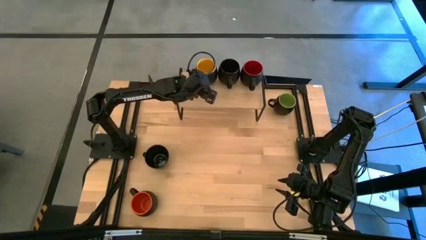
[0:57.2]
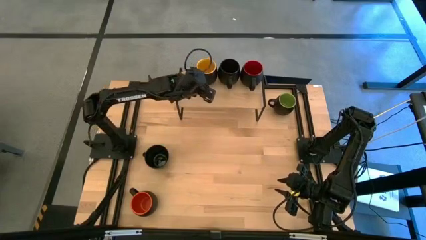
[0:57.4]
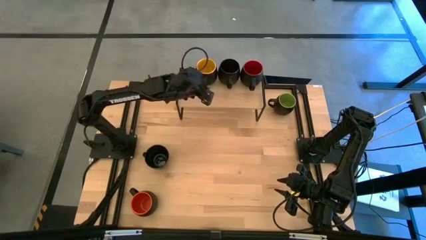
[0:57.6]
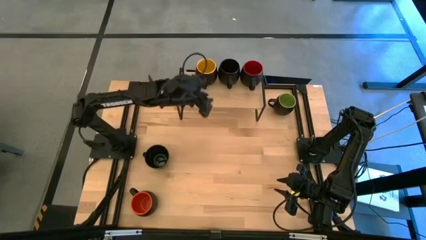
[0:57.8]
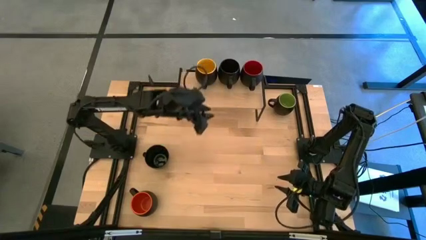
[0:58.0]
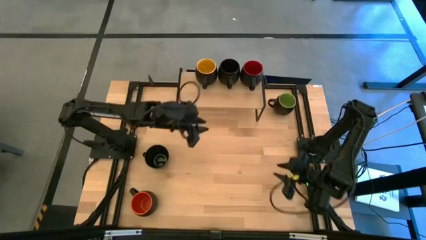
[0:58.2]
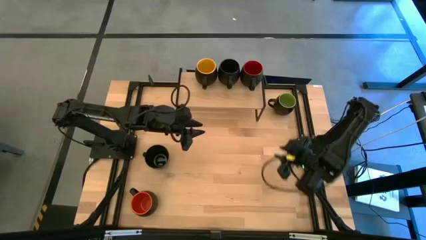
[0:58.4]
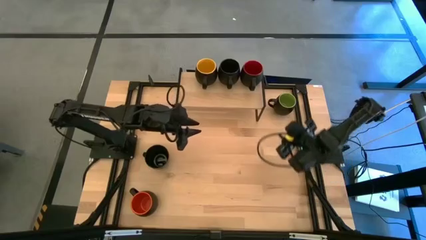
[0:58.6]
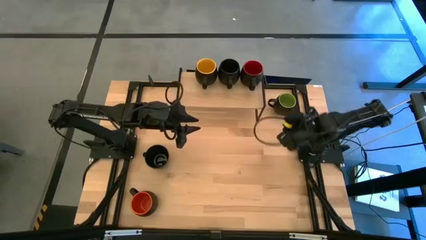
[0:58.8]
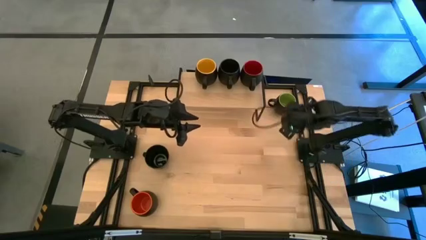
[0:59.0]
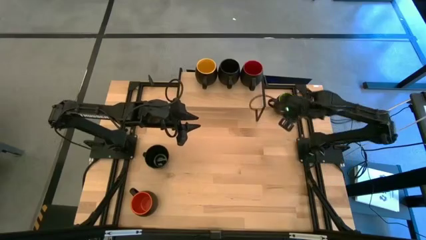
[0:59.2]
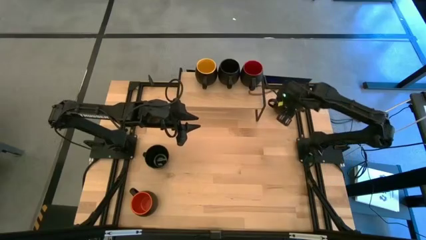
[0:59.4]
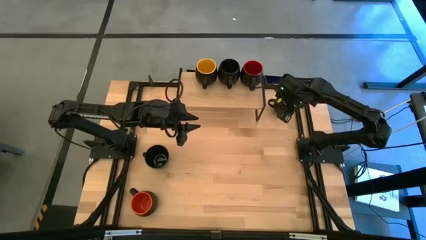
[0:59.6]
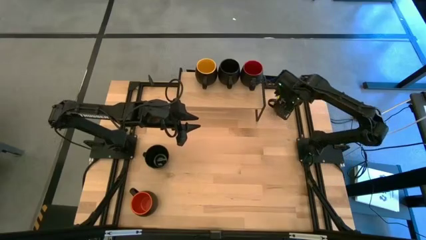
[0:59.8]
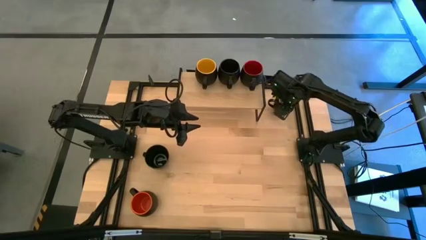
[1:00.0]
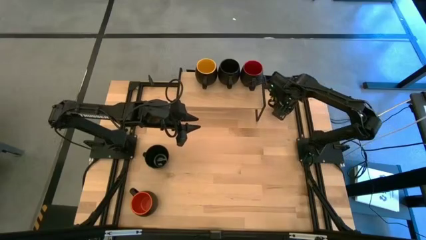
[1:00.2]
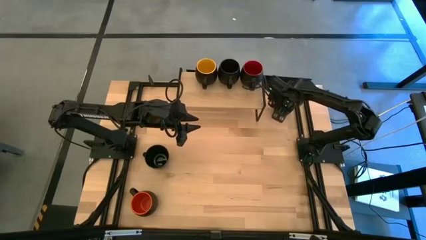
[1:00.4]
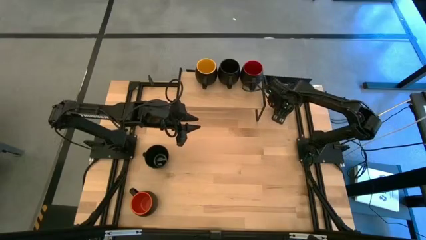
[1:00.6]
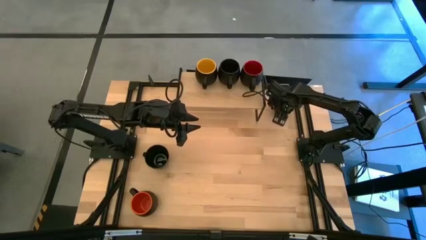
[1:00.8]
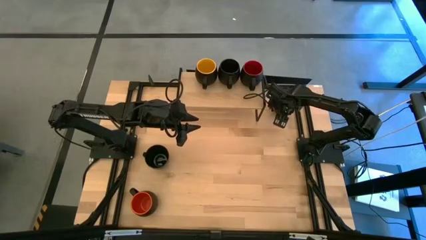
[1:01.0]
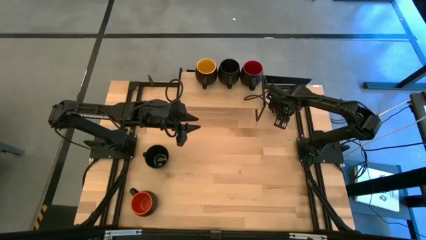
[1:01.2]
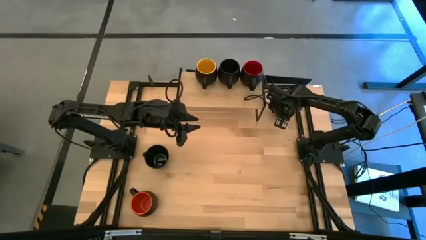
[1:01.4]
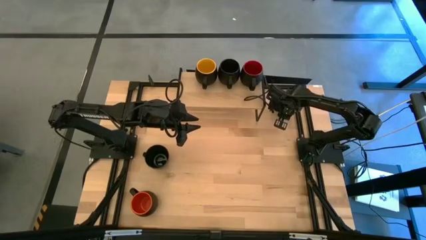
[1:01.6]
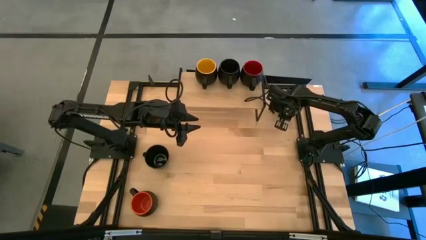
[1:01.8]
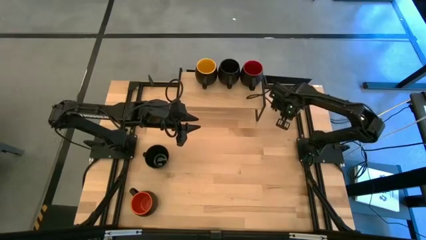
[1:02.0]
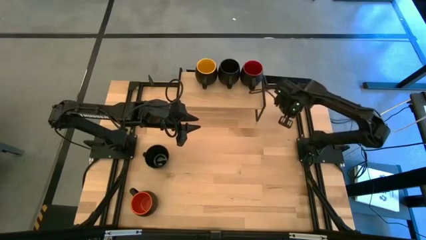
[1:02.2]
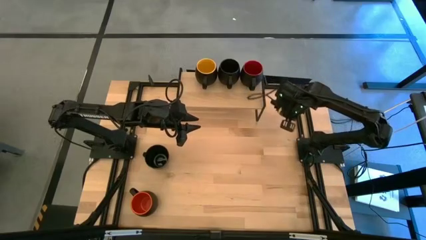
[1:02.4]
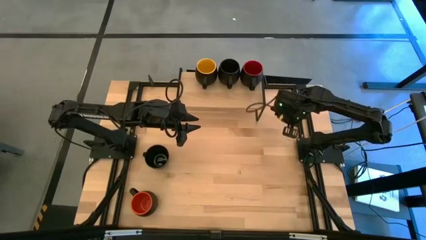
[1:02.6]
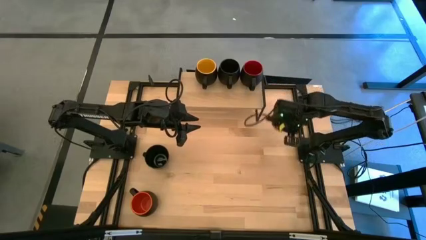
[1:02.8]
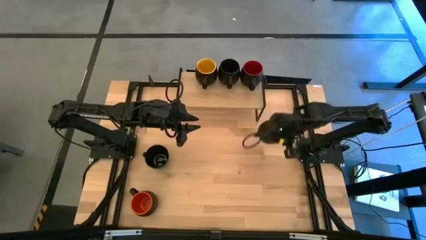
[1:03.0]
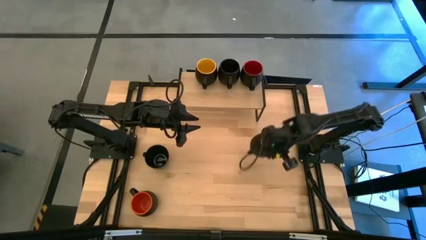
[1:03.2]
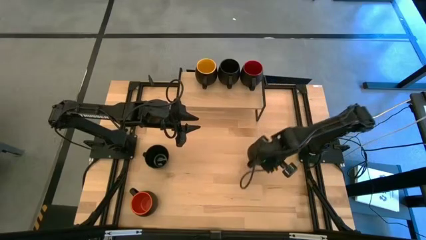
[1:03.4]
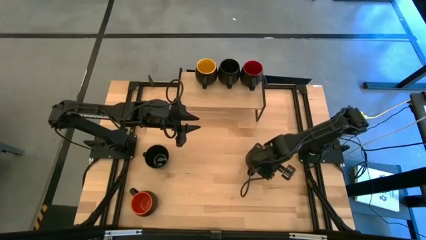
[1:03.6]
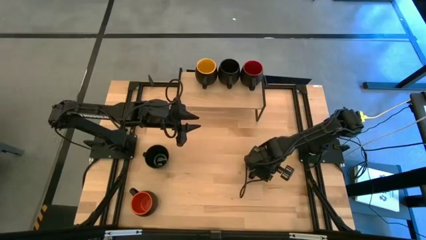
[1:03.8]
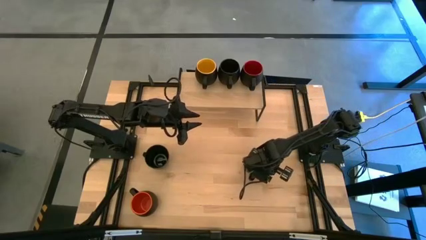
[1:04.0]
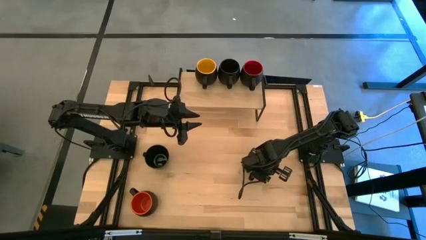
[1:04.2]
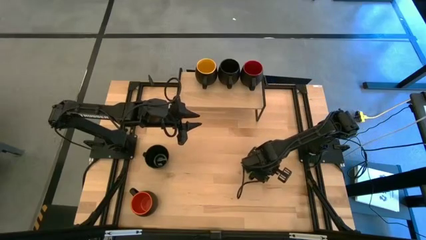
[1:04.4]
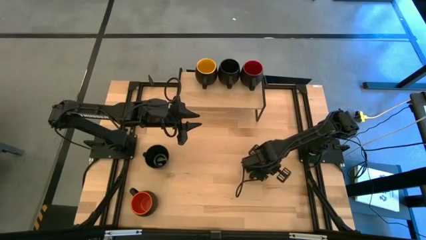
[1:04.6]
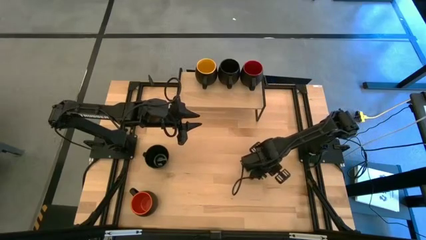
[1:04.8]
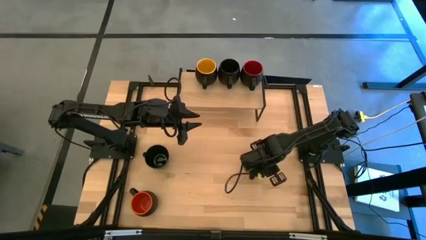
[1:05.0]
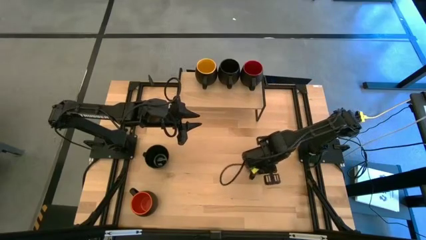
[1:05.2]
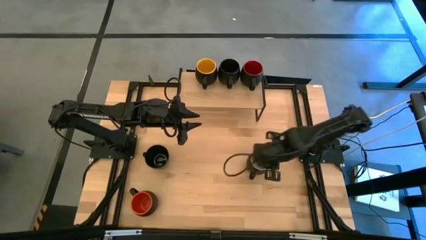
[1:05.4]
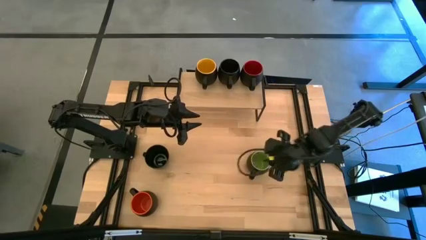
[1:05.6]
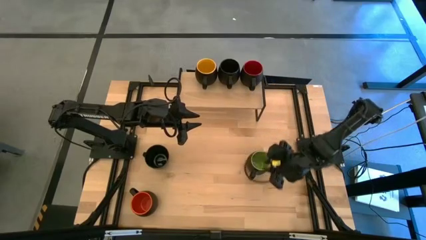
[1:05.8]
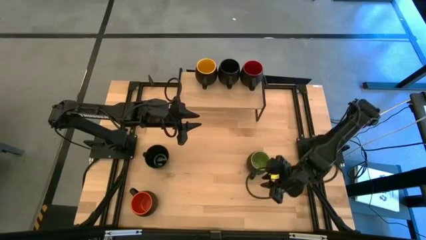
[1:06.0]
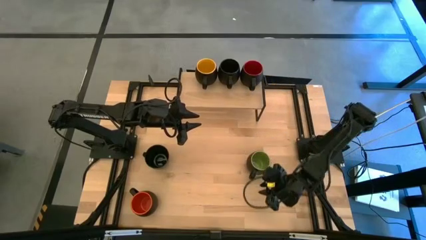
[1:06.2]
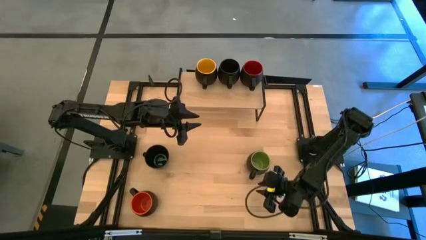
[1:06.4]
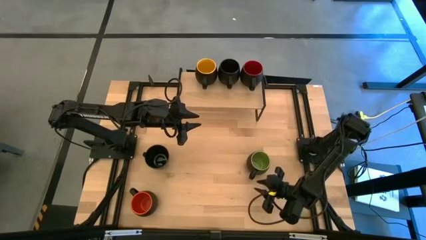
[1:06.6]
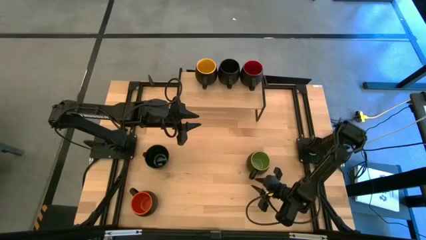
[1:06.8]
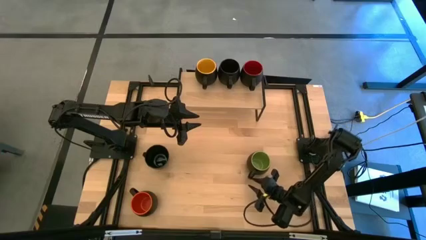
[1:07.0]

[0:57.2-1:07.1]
Task: Place coffee mugs
Put the green mug on the shelf

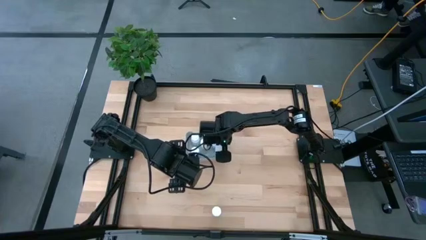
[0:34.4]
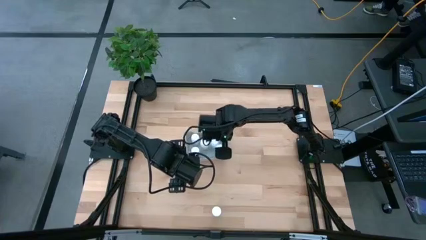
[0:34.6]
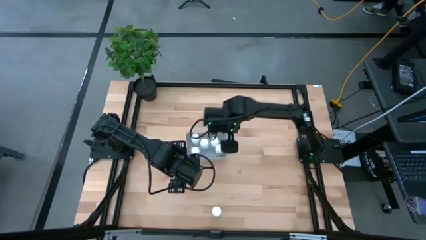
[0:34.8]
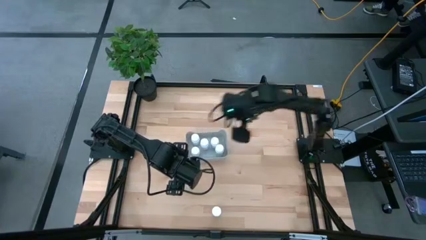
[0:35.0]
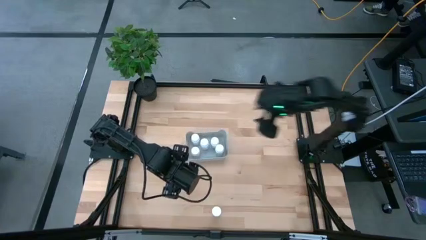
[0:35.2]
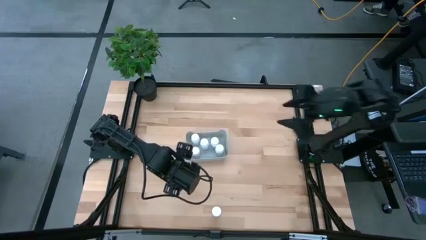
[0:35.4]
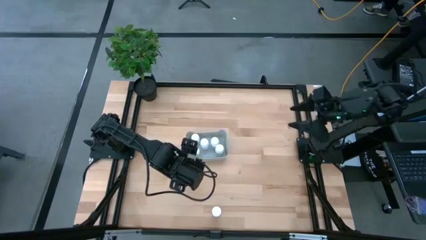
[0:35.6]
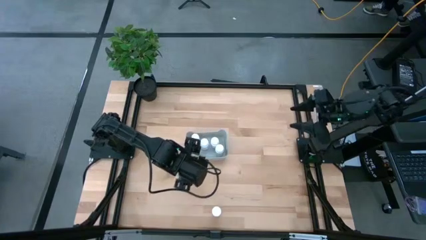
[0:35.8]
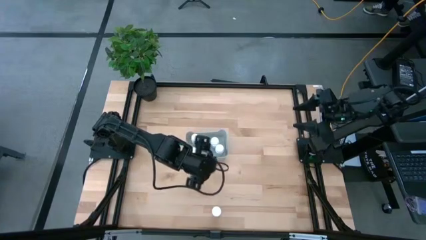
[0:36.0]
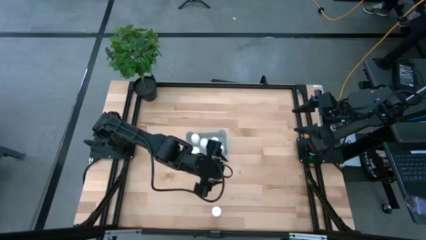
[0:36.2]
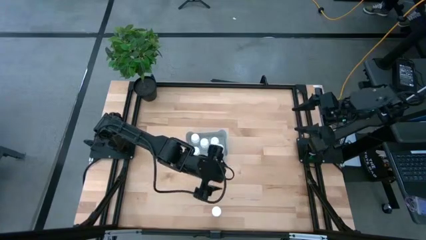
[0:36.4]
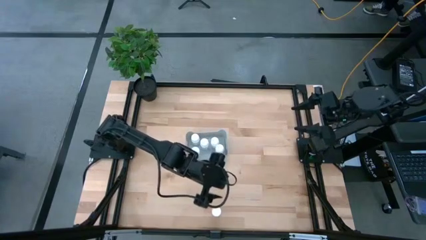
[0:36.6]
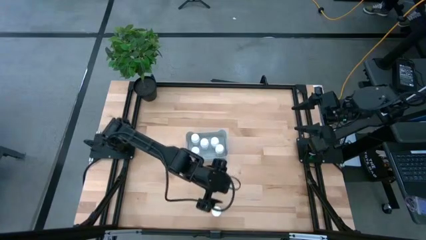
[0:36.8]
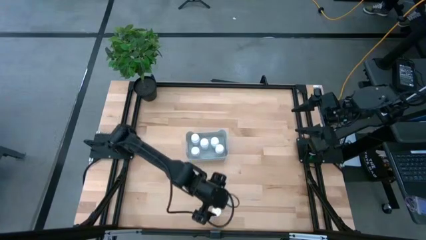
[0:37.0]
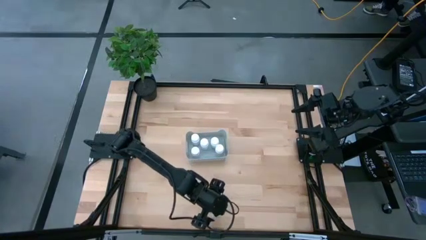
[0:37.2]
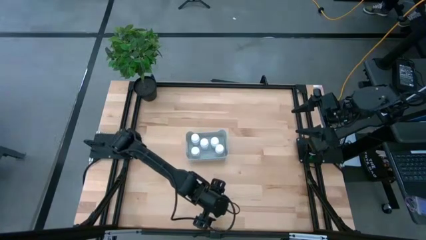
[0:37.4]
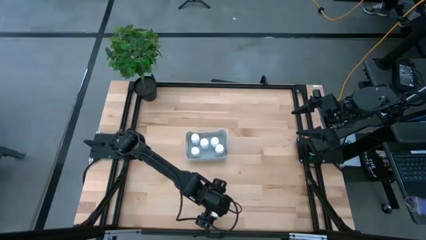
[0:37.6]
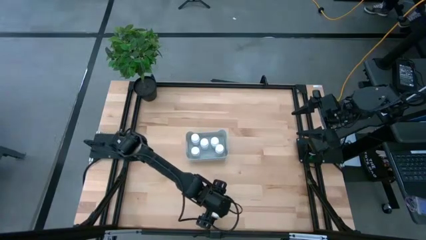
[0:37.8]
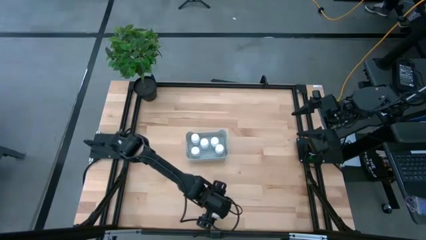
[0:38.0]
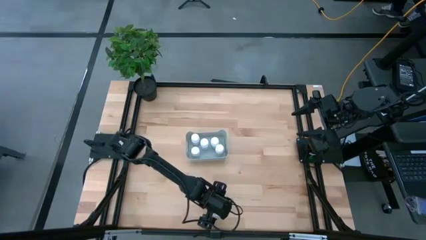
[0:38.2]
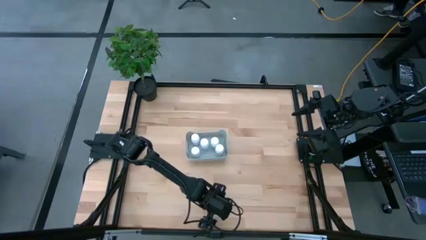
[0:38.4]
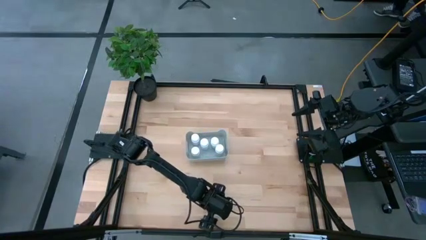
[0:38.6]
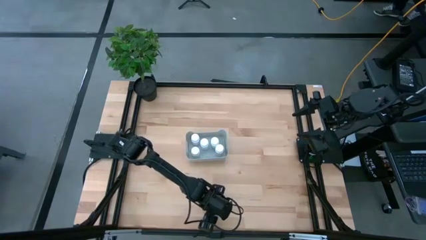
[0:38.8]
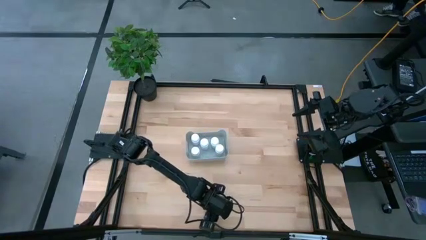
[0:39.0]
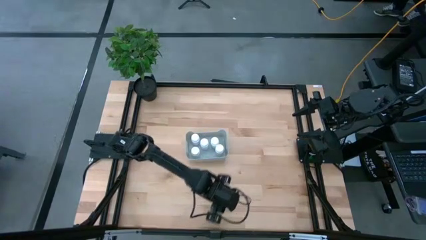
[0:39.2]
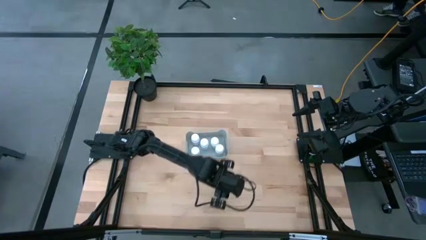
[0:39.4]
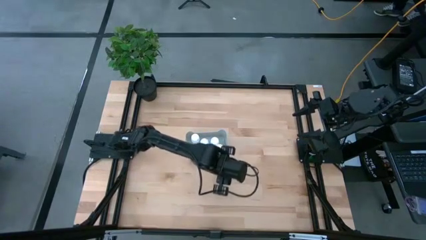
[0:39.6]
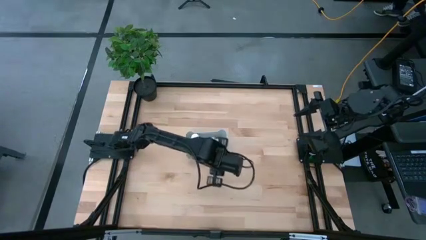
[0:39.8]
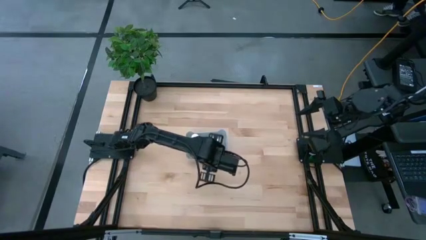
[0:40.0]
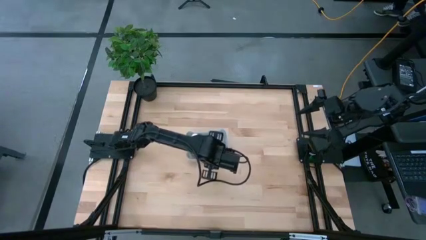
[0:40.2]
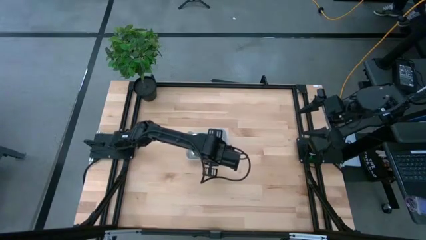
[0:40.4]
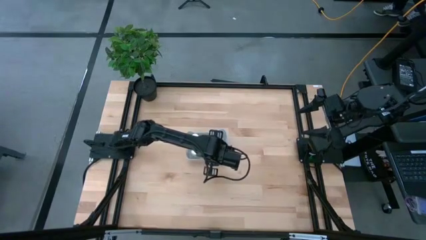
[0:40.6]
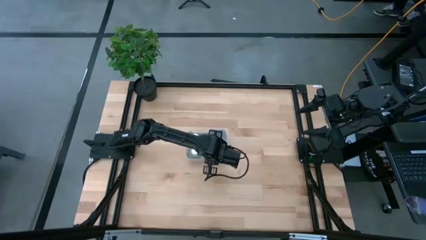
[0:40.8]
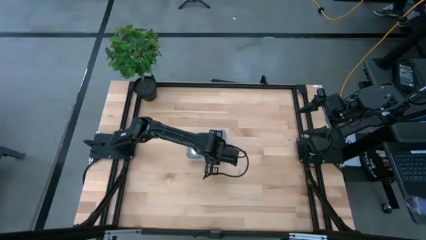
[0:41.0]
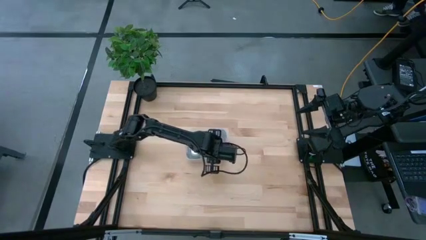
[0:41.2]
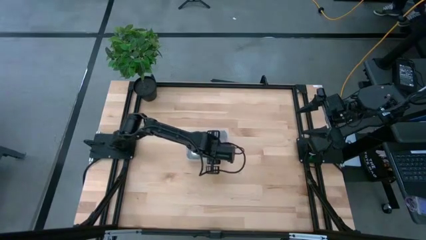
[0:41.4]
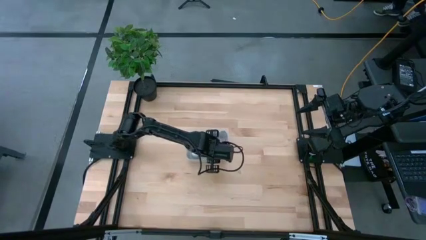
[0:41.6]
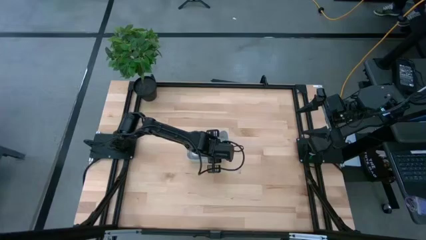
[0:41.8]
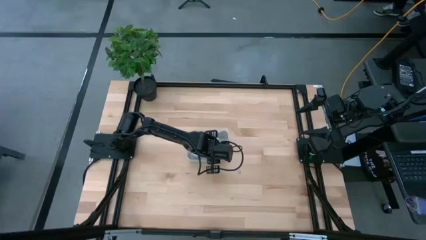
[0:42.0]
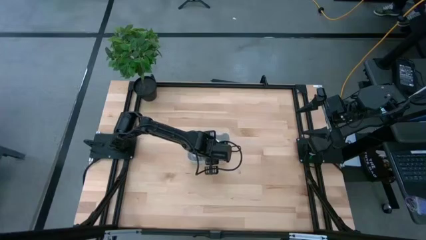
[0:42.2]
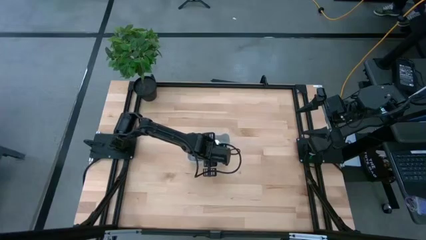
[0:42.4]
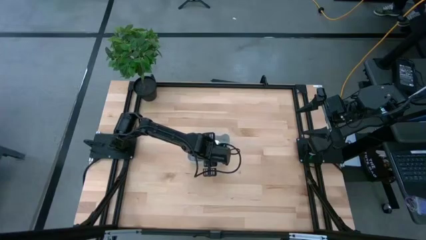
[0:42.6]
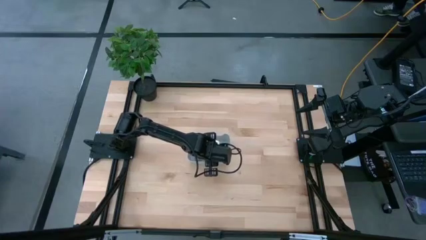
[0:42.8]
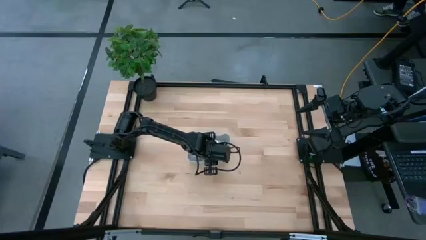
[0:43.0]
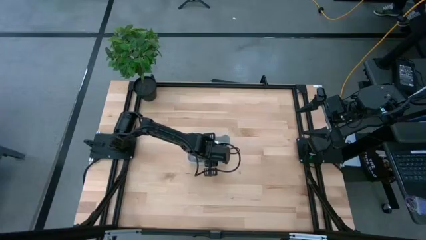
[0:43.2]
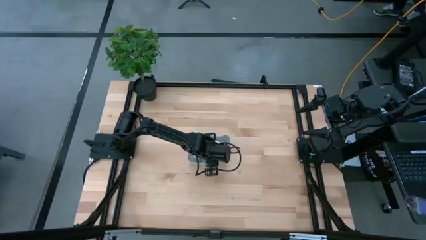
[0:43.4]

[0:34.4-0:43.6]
Task: Pick and place pill bottles into a basket
Put the white pill bottle into the gray basket
